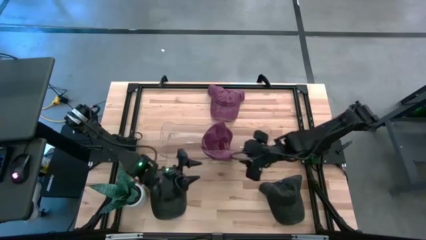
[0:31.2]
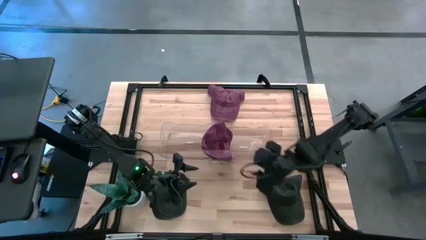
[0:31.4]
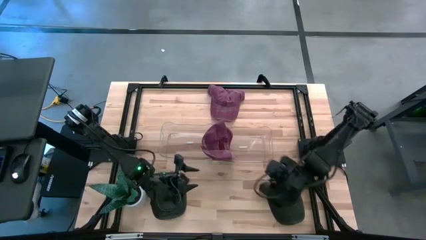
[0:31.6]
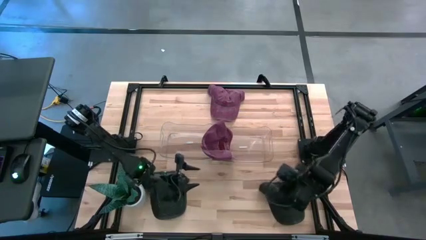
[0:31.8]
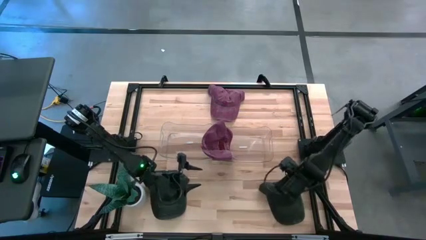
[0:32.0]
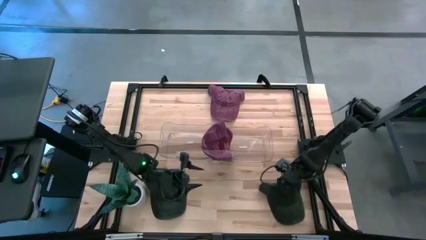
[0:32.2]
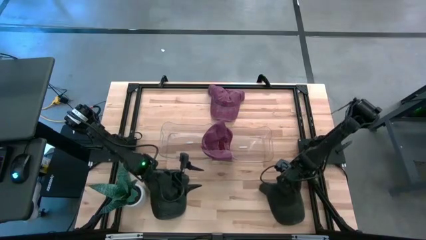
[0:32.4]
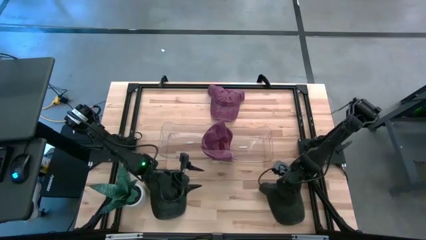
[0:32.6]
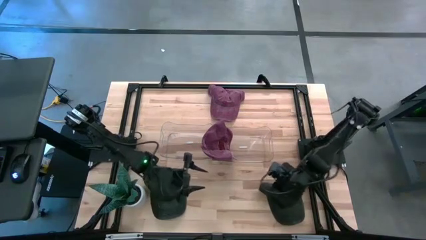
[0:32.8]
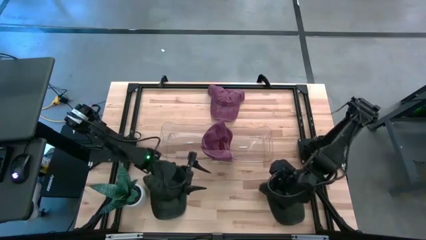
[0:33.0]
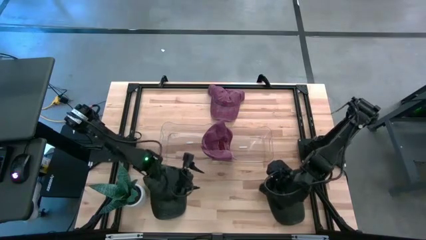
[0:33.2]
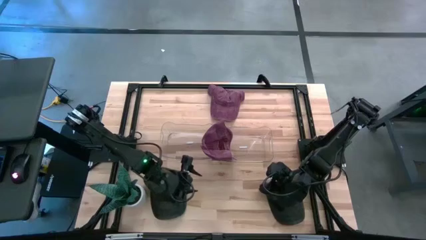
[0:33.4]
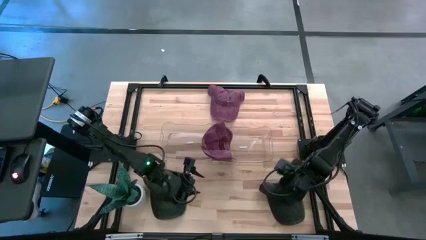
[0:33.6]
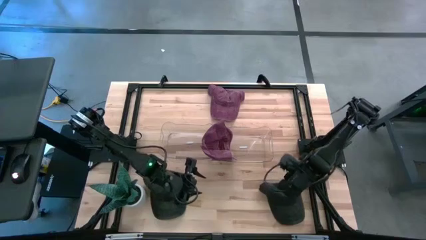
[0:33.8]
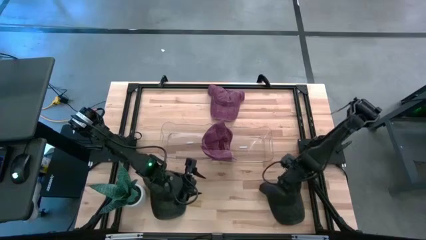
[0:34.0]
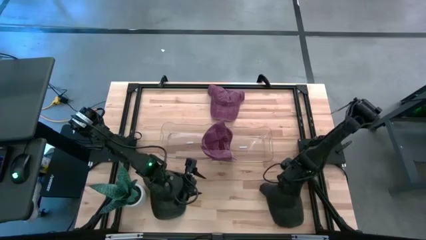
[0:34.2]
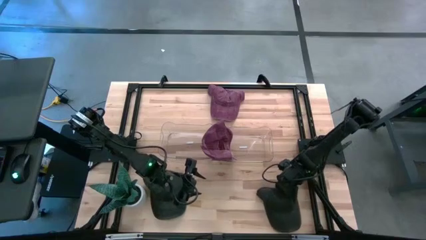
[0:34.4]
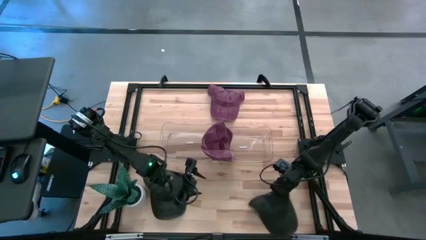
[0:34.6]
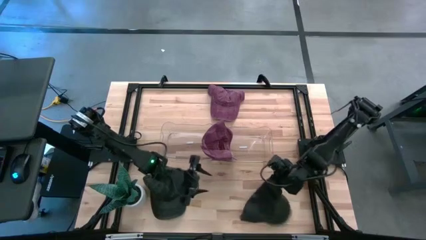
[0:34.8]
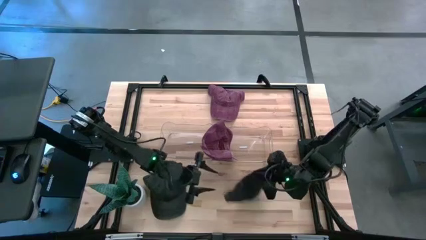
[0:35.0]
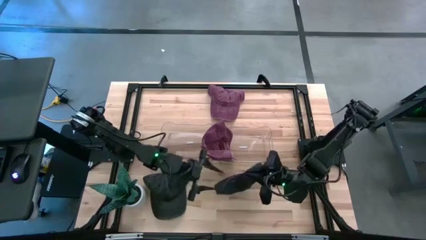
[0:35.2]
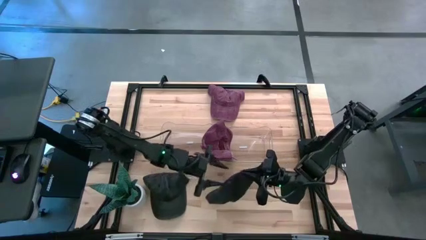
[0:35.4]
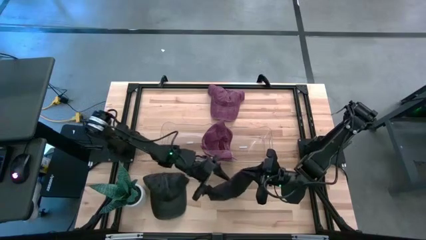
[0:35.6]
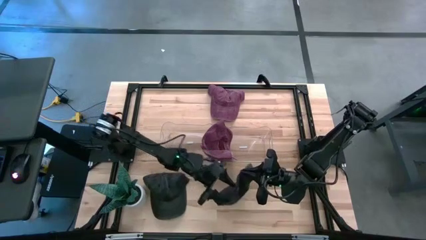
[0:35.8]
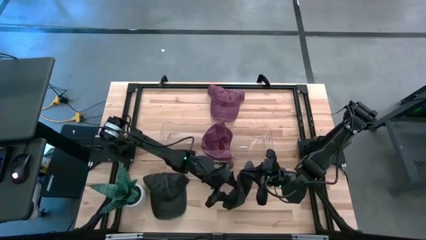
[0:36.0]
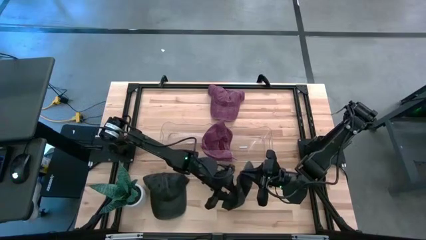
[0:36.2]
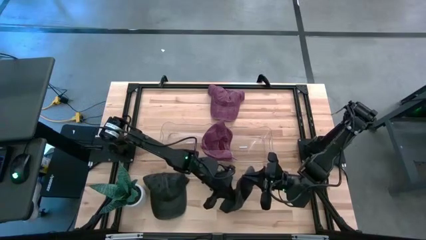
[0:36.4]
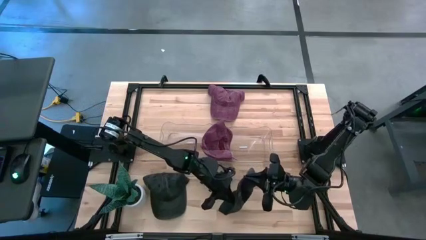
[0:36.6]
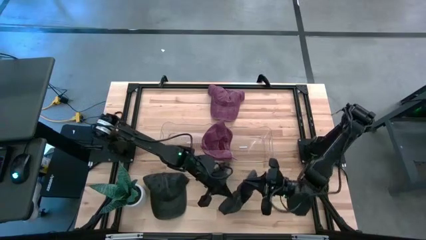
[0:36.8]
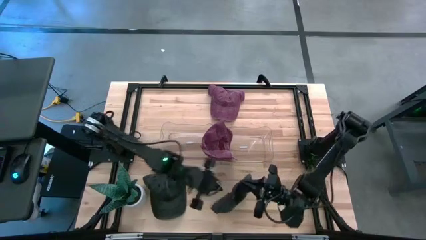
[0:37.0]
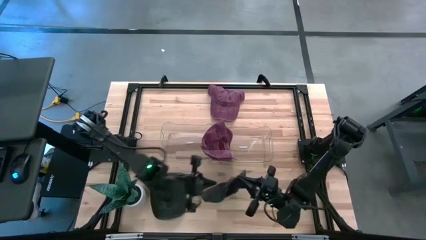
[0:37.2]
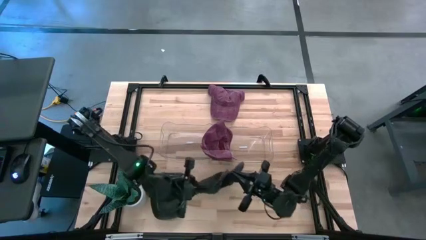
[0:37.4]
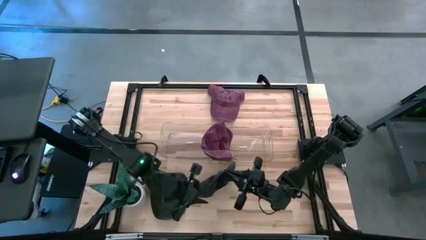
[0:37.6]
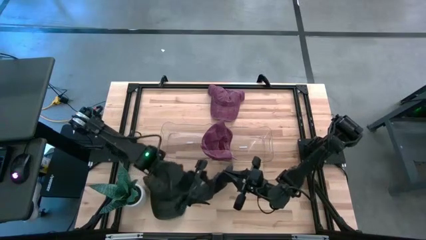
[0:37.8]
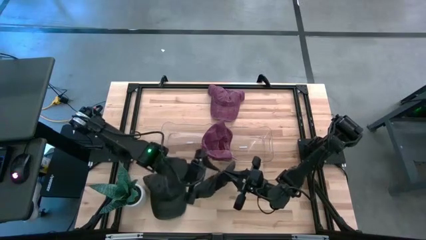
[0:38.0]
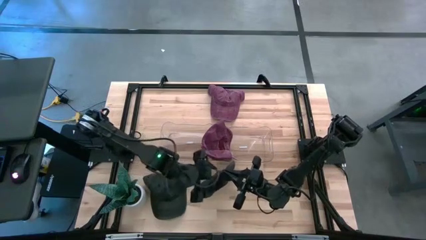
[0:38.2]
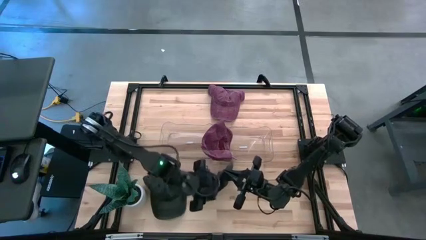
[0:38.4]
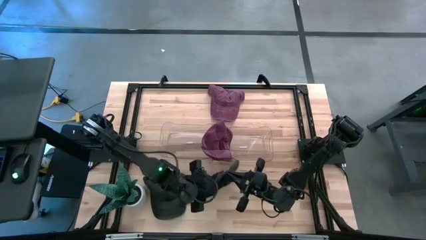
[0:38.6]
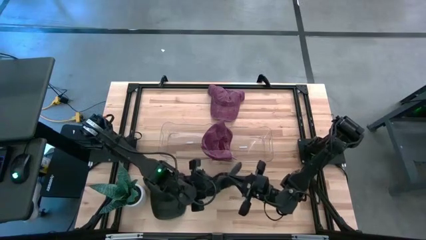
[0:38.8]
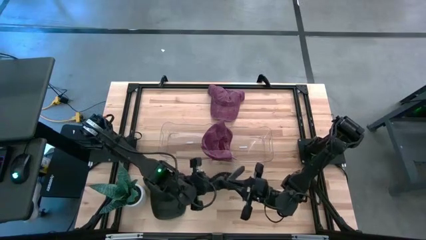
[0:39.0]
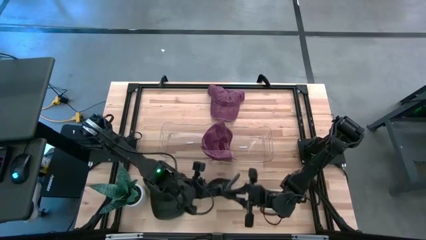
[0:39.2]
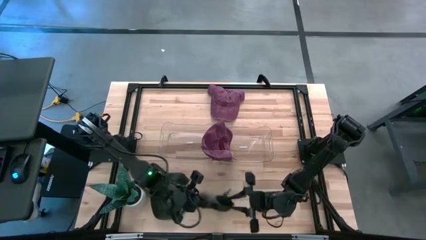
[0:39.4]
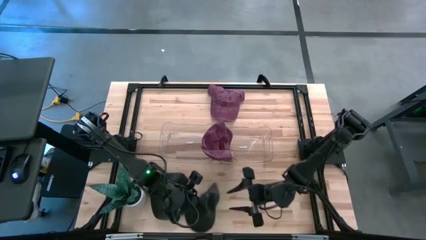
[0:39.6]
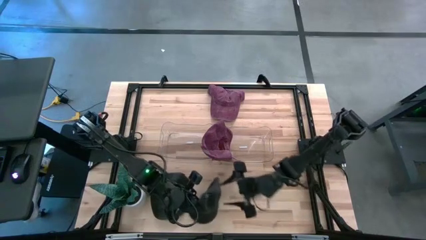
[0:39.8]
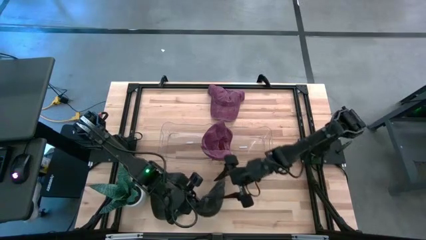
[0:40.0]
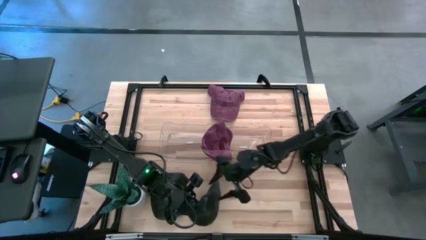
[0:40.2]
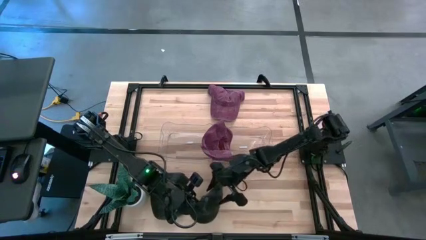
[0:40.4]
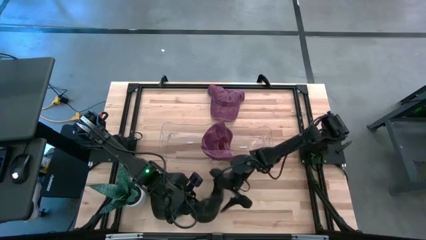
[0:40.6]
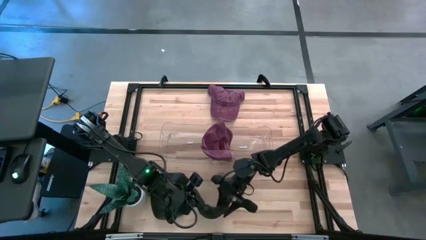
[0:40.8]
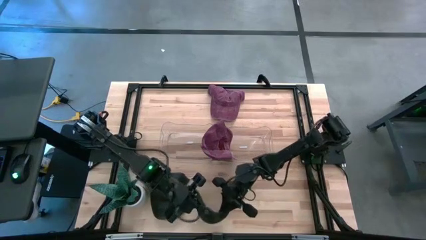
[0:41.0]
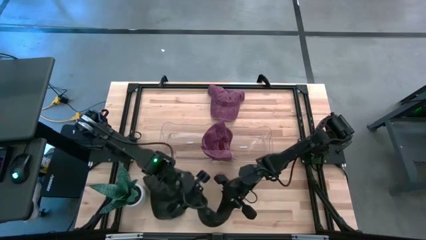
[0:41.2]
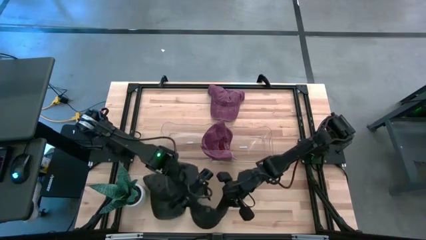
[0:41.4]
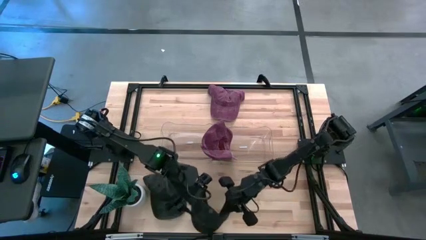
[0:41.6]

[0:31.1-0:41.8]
Task: Pick & Place hat
Put the right black cap into the left transparent bin
